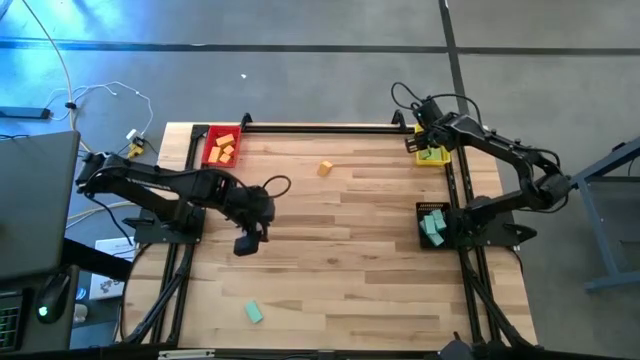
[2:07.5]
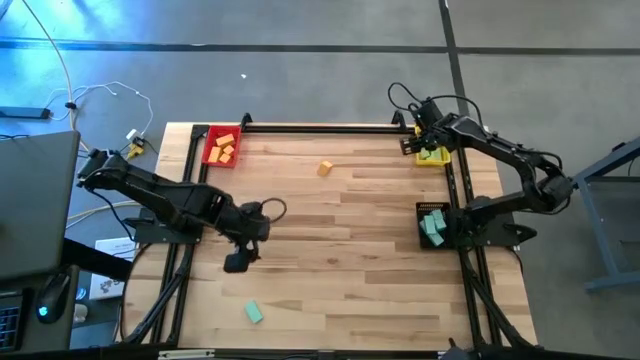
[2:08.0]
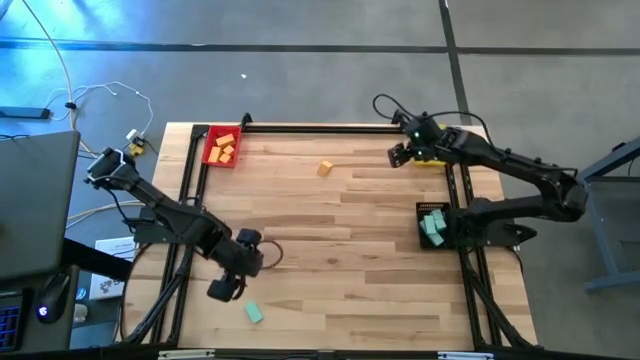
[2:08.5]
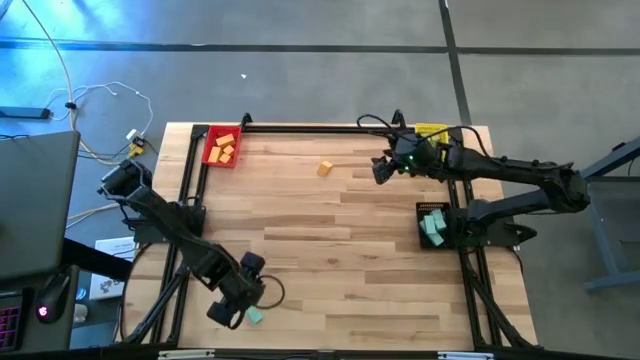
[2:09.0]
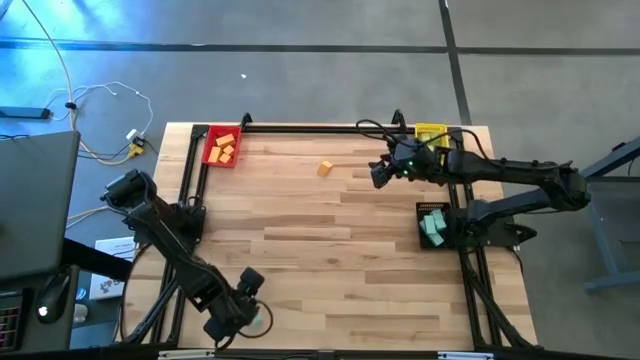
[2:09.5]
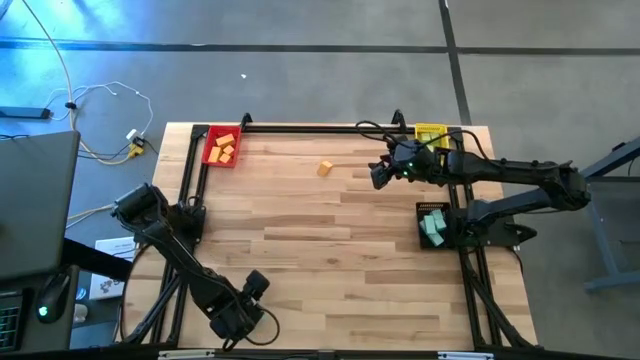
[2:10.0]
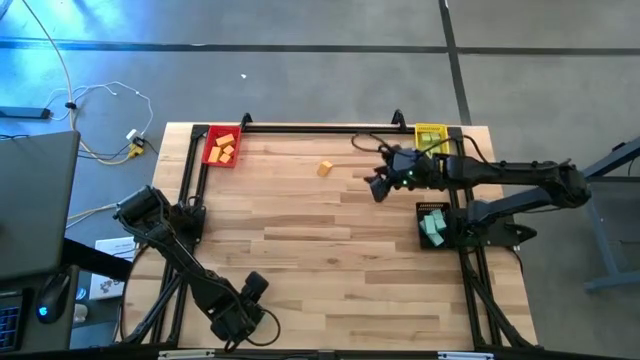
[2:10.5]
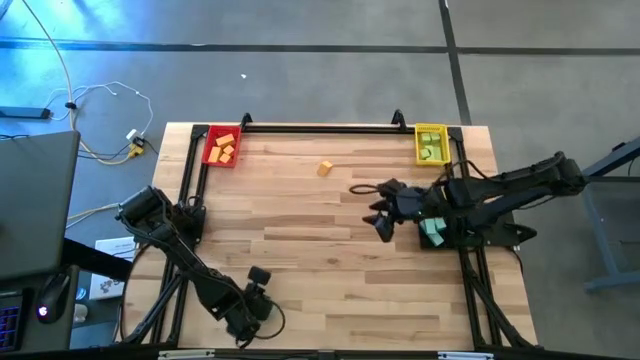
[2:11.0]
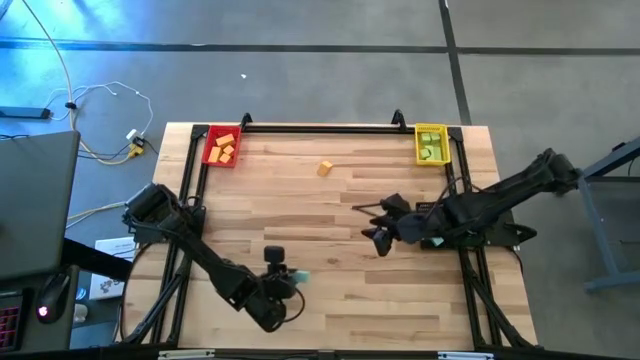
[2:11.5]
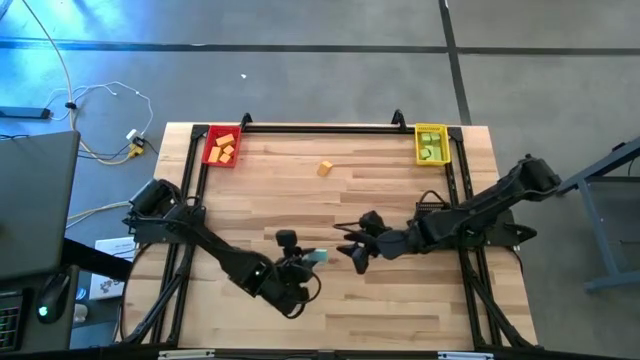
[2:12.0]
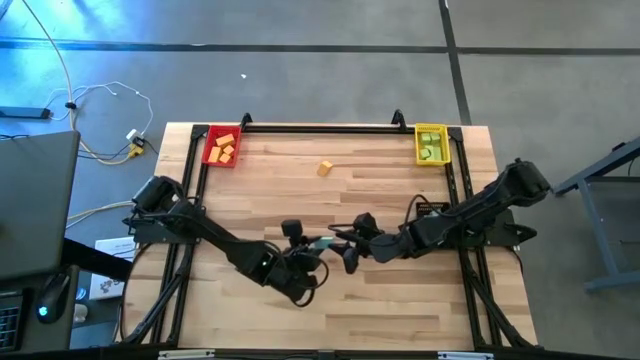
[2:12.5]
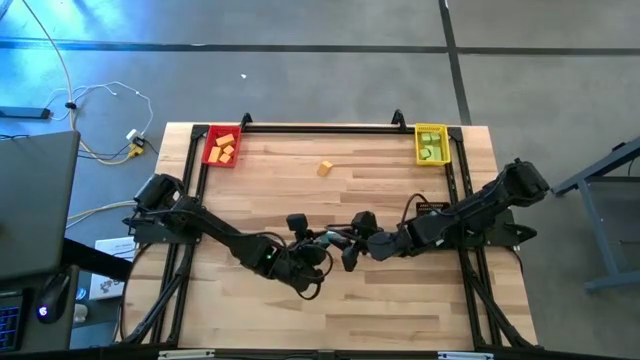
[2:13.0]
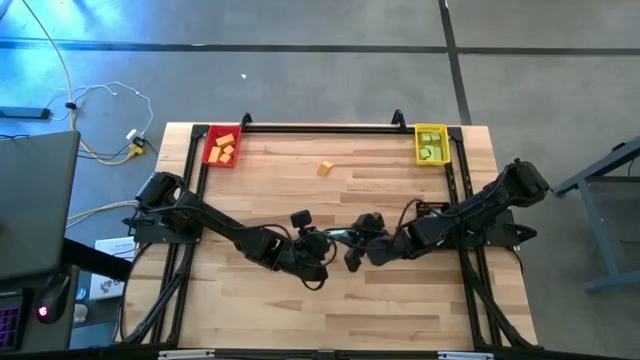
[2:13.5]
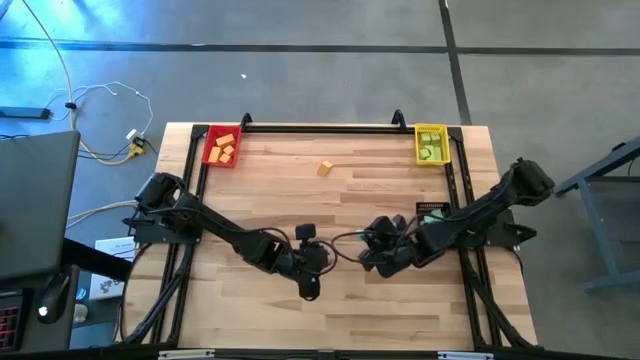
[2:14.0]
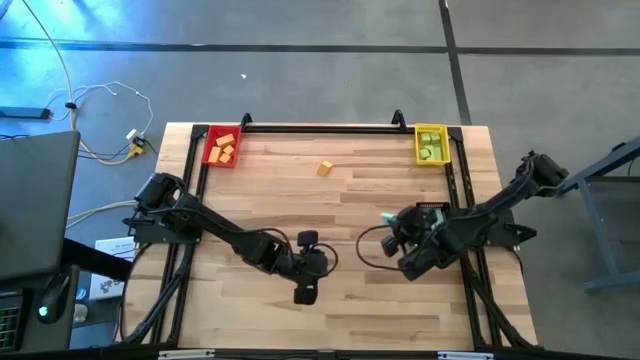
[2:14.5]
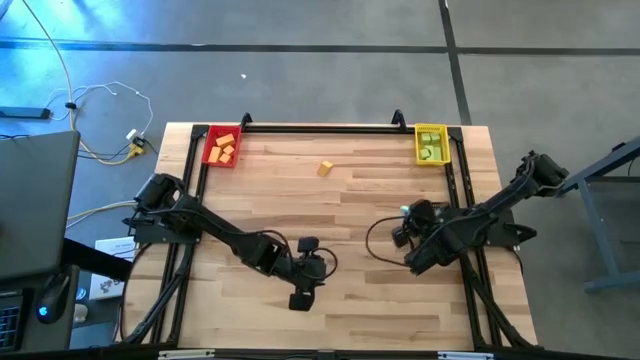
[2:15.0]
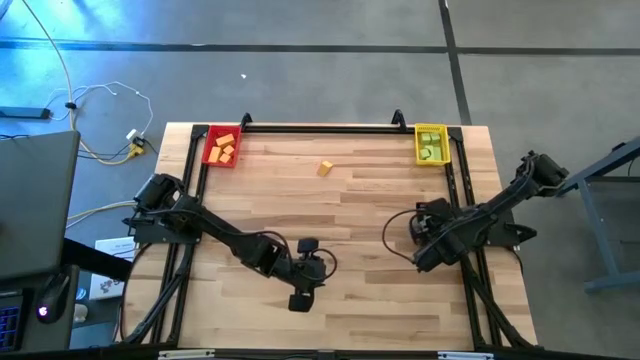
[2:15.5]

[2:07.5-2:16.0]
Task: Sort & place blocks by color
Put the blue block into the black bin

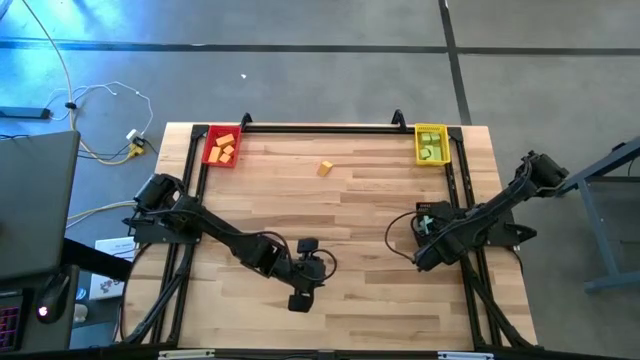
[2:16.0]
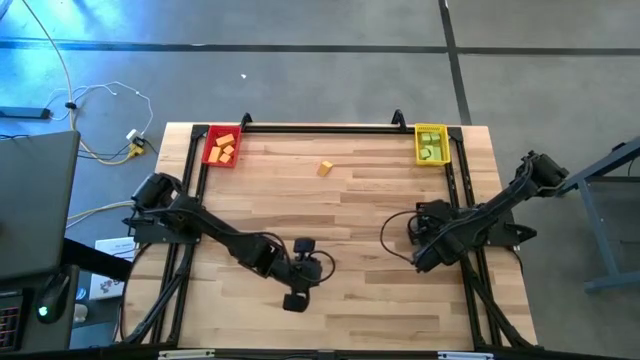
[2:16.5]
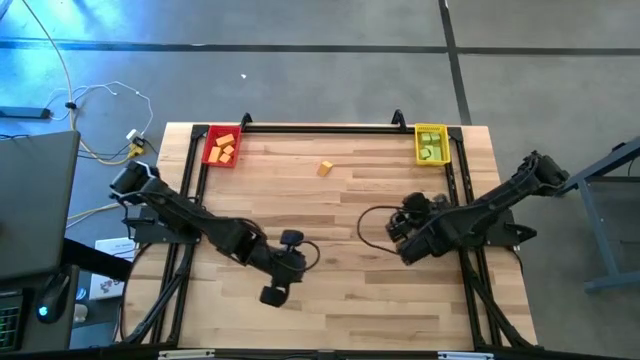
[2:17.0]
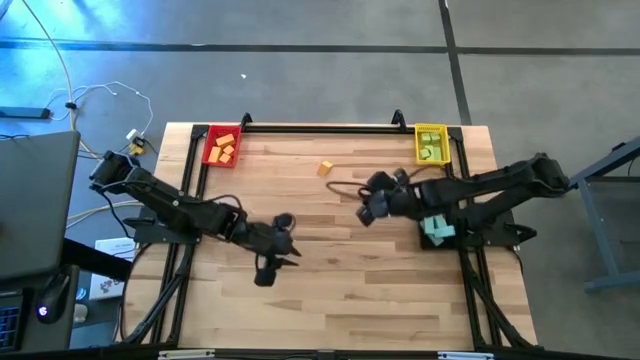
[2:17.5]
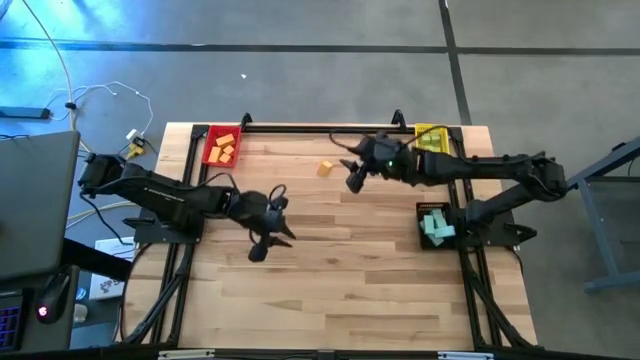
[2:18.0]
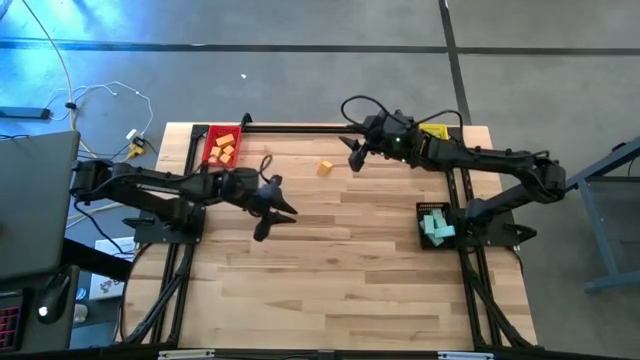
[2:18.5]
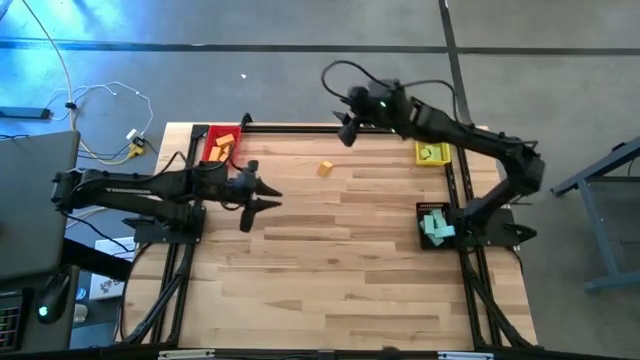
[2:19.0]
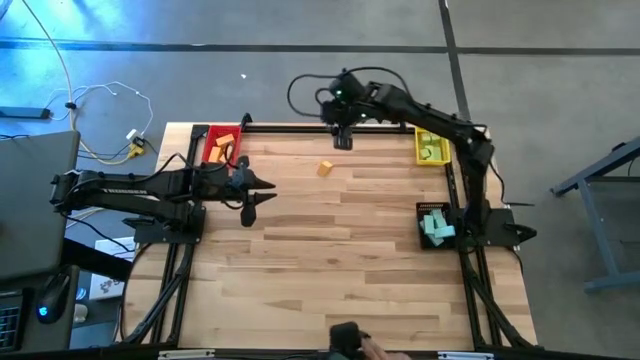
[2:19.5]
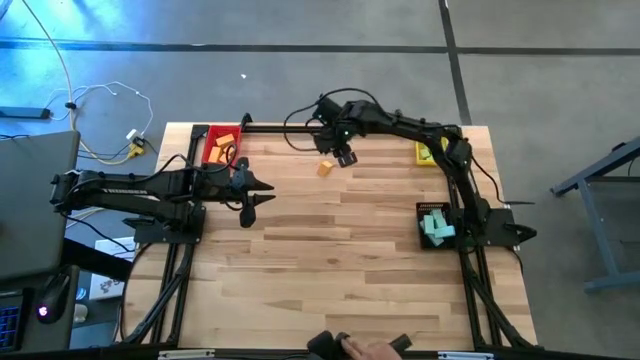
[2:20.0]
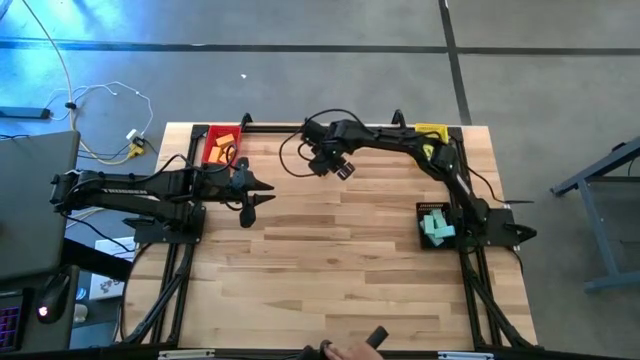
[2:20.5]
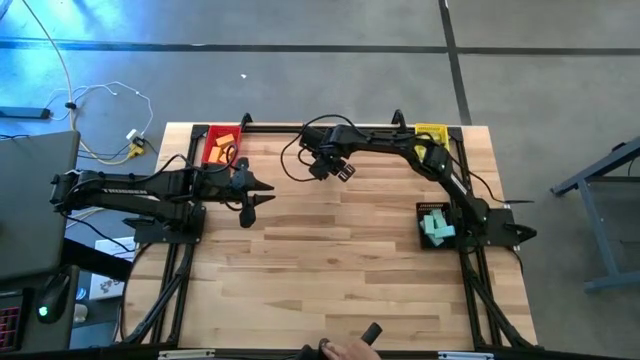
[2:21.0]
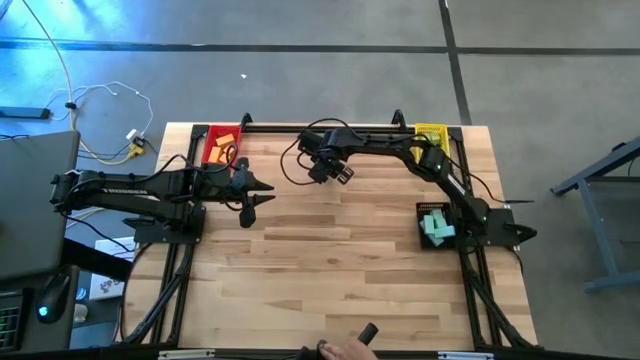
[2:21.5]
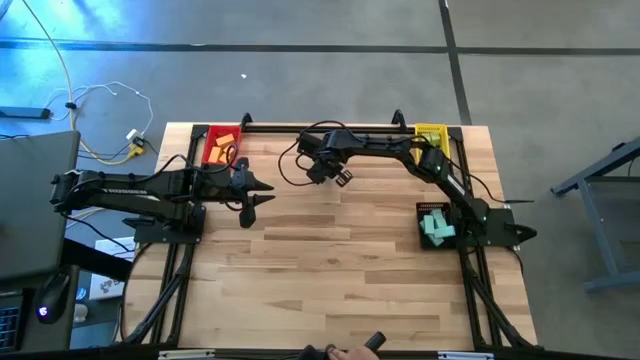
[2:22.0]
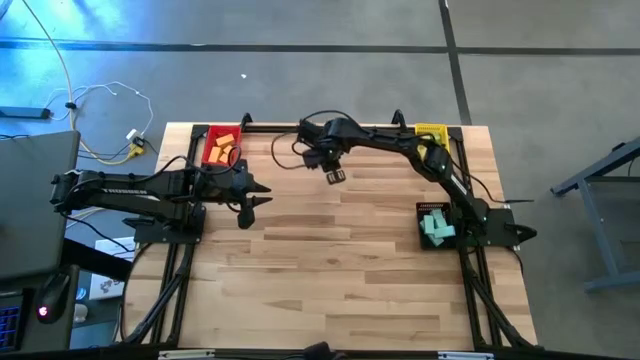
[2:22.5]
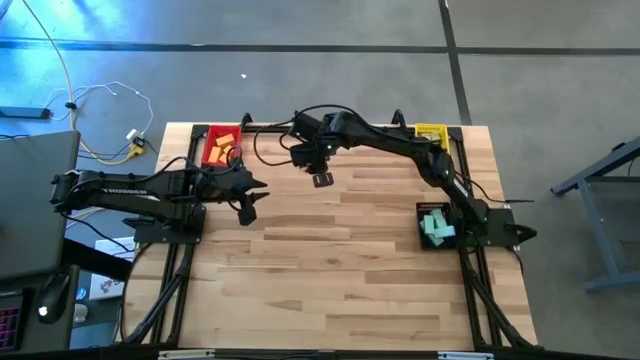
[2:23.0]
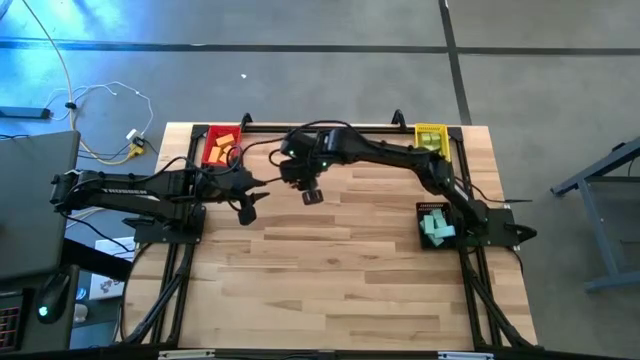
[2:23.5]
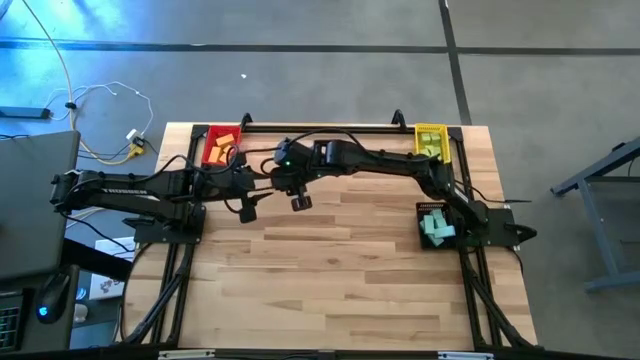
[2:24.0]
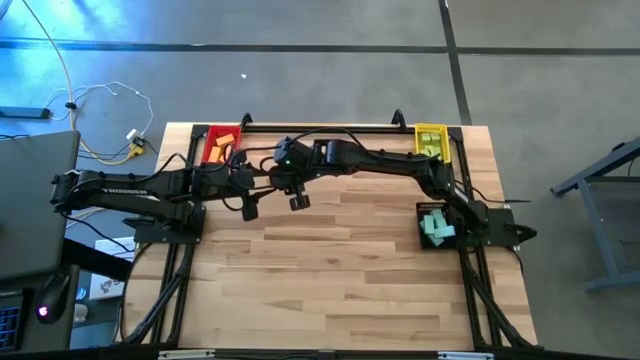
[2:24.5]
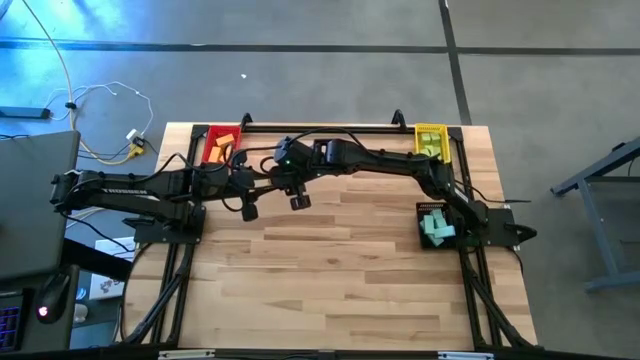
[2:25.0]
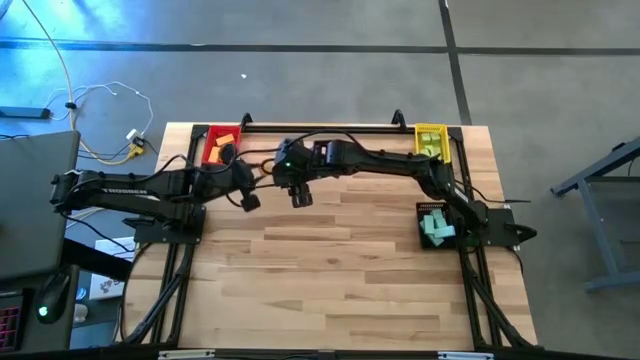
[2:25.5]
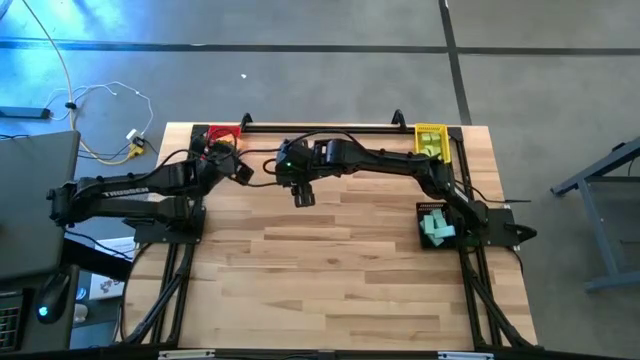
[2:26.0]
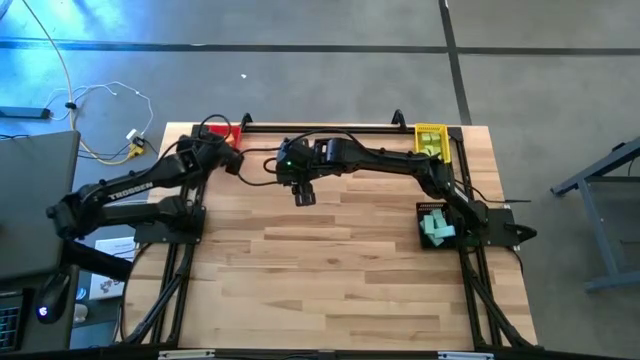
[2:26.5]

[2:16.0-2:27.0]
Put the yellow block into the red bin

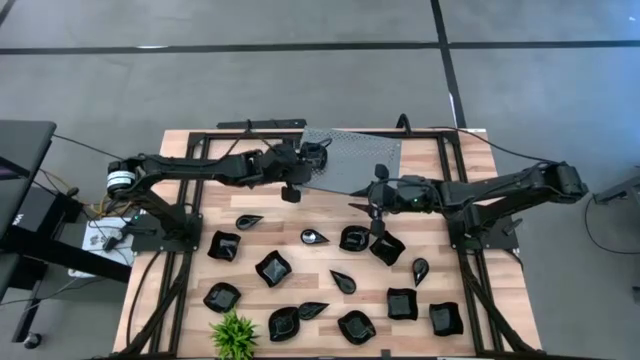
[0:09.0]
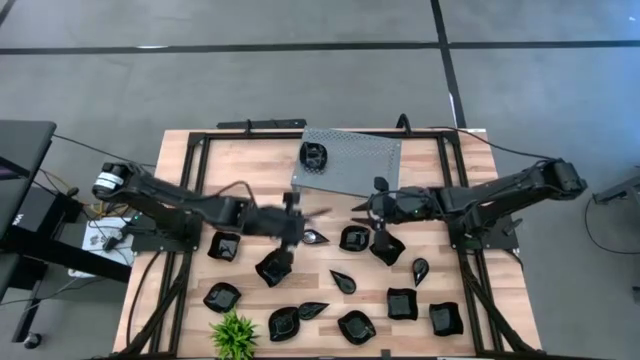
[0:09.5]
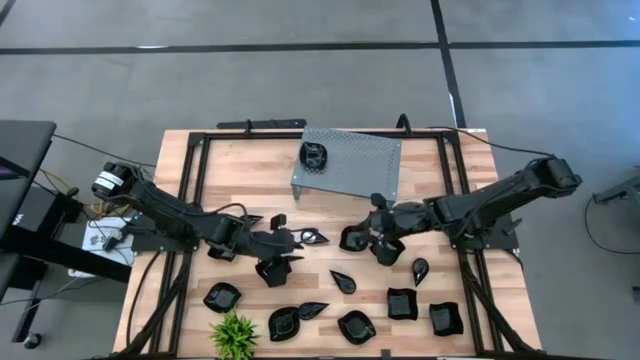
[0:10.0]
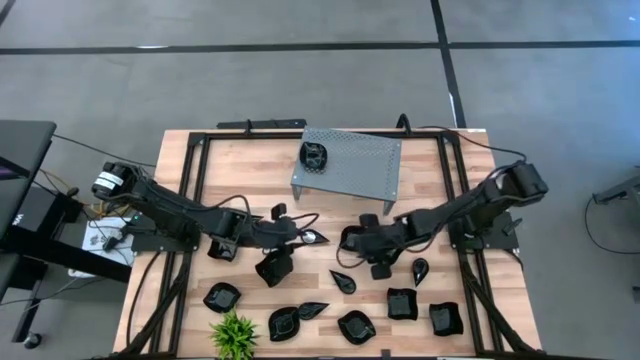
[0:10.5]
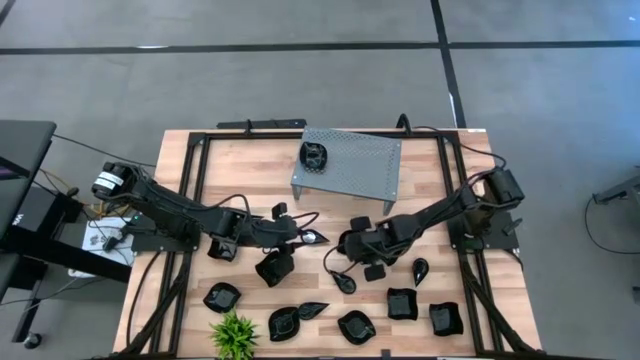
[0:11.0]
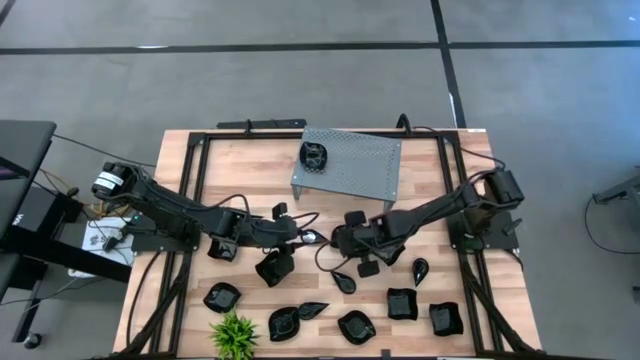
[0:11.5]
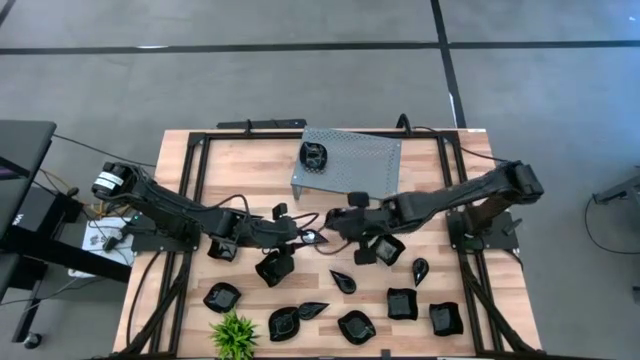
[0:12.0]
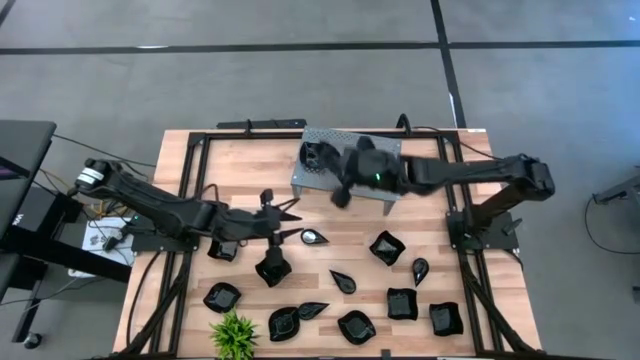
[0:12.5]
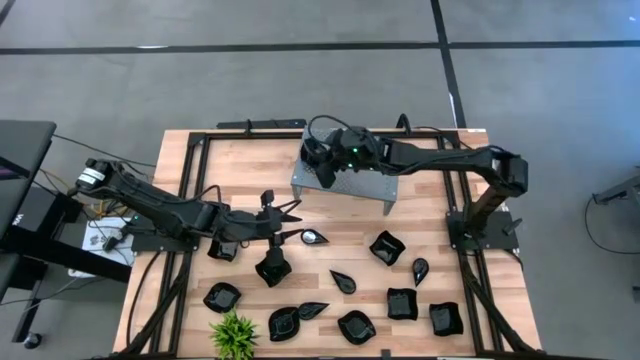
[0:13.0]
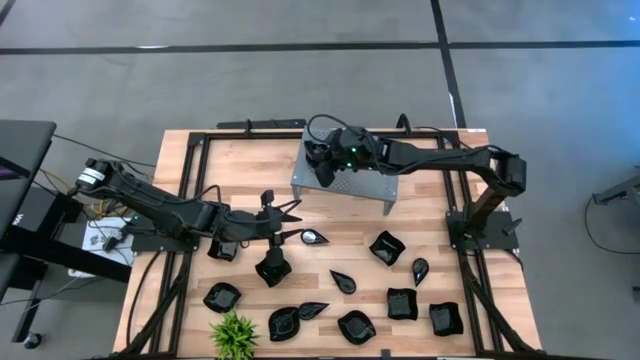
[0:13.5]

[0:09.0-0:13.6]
Task: Pick & Place Mini shaped plates
Stack the black leaf-shaped plate on the other black leaf-shaped plate on the shelf
